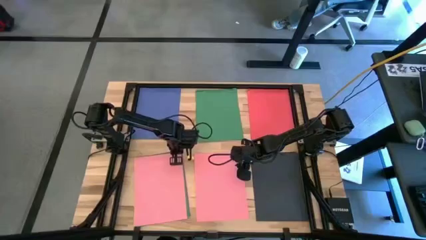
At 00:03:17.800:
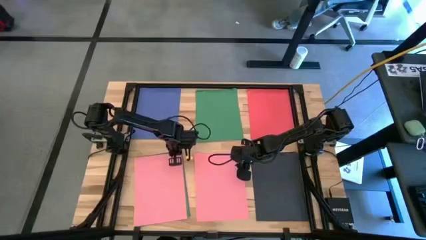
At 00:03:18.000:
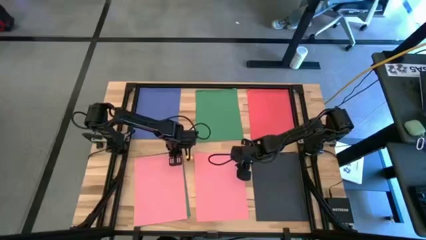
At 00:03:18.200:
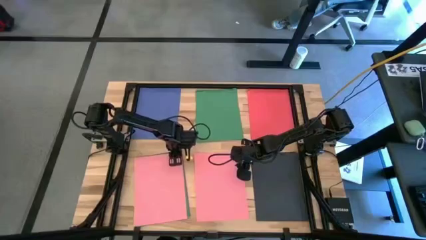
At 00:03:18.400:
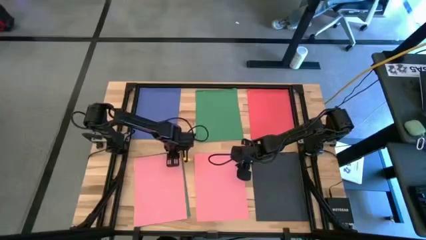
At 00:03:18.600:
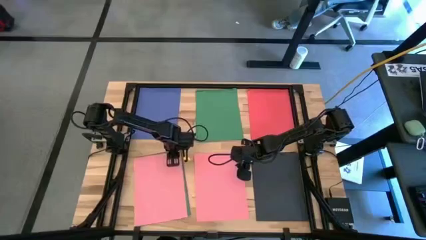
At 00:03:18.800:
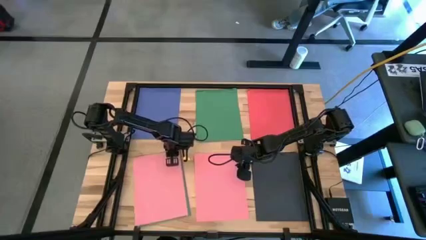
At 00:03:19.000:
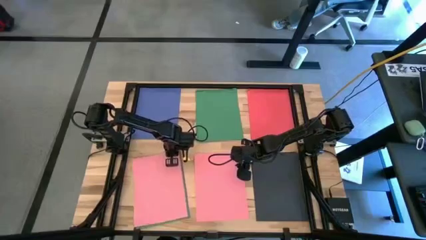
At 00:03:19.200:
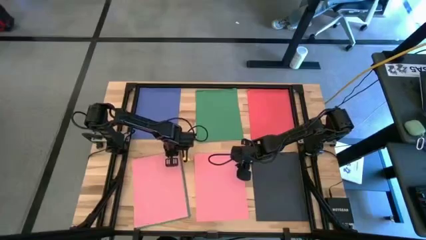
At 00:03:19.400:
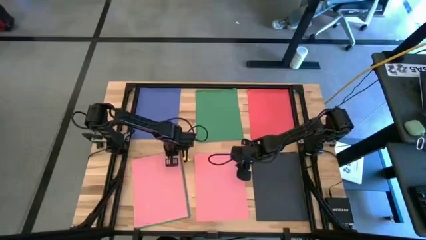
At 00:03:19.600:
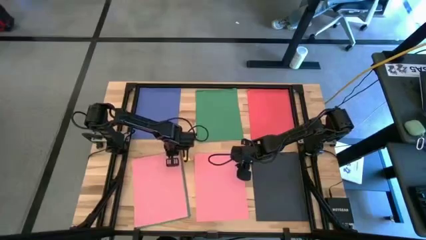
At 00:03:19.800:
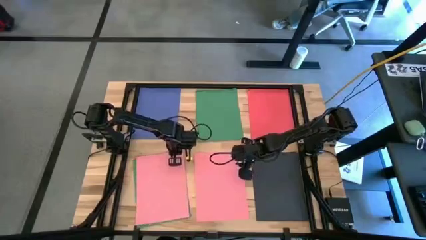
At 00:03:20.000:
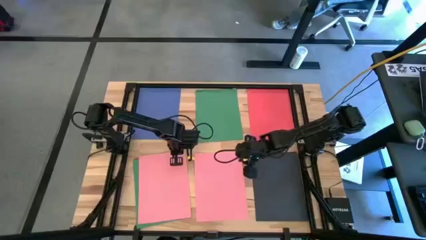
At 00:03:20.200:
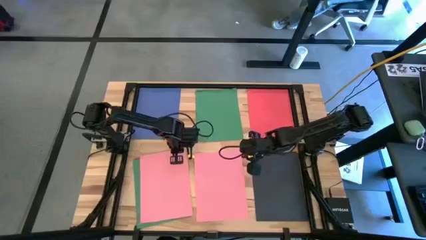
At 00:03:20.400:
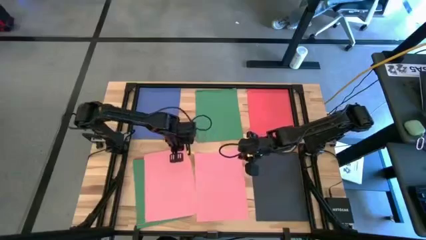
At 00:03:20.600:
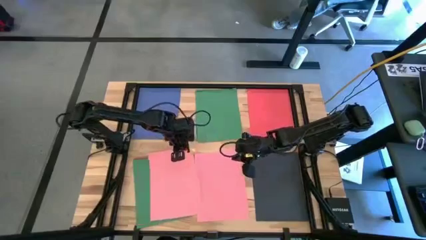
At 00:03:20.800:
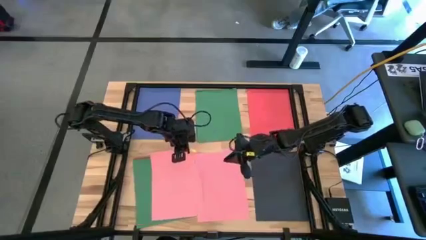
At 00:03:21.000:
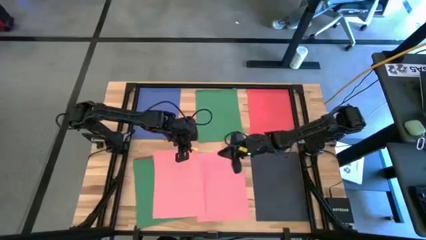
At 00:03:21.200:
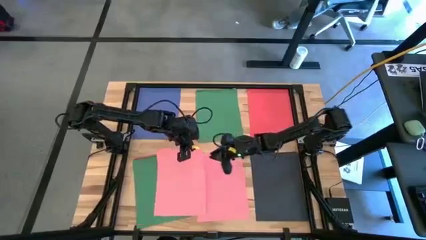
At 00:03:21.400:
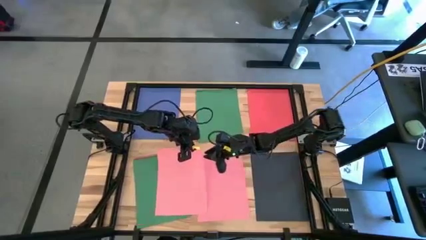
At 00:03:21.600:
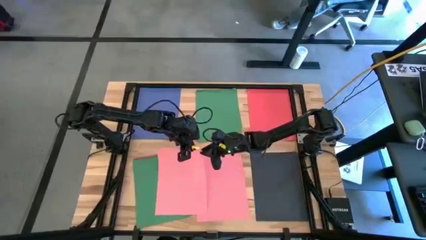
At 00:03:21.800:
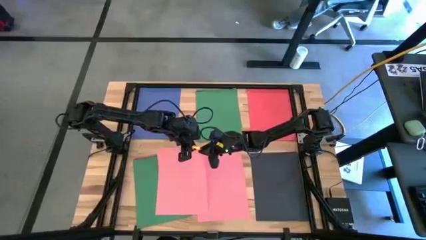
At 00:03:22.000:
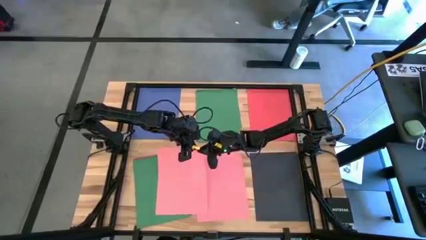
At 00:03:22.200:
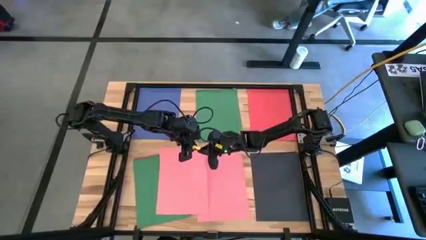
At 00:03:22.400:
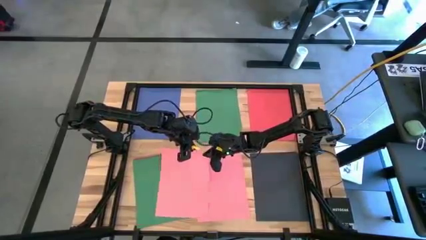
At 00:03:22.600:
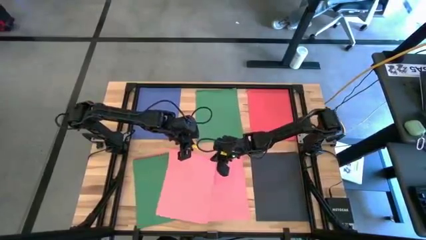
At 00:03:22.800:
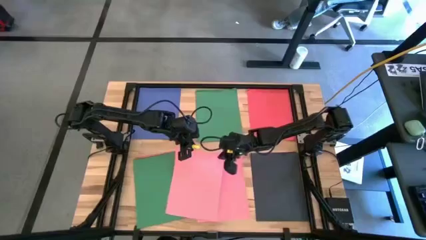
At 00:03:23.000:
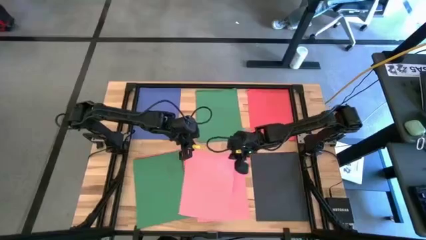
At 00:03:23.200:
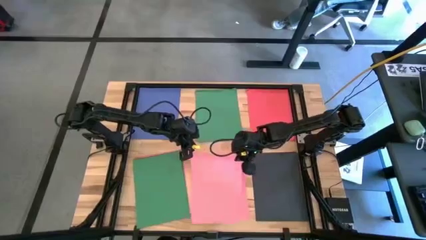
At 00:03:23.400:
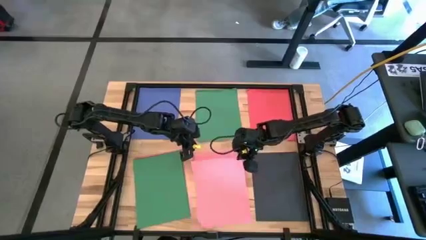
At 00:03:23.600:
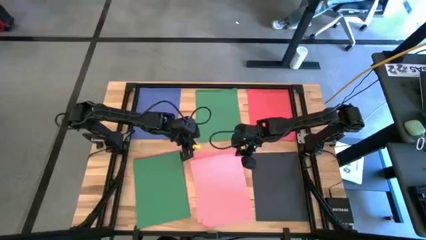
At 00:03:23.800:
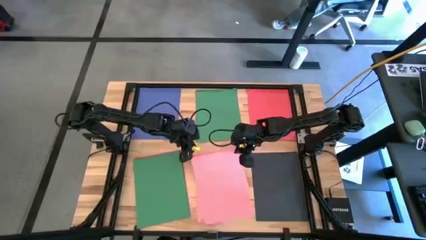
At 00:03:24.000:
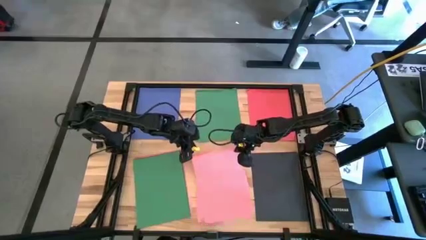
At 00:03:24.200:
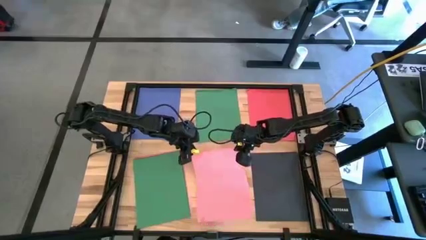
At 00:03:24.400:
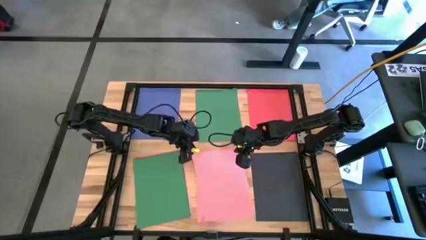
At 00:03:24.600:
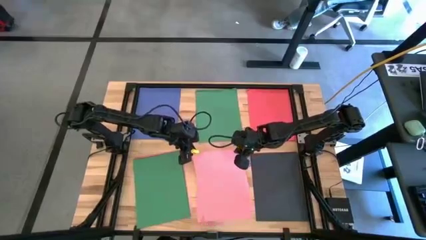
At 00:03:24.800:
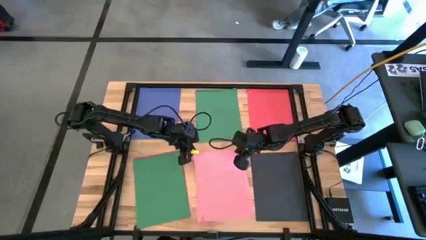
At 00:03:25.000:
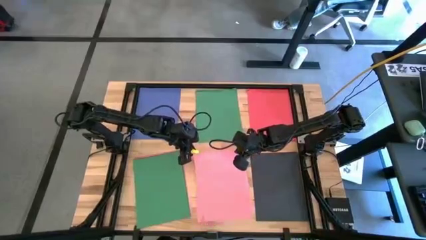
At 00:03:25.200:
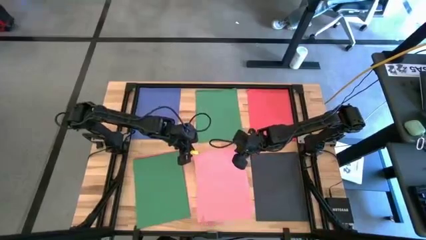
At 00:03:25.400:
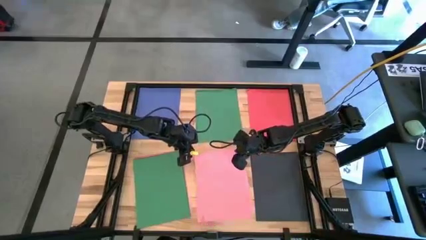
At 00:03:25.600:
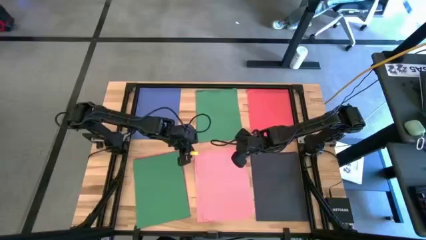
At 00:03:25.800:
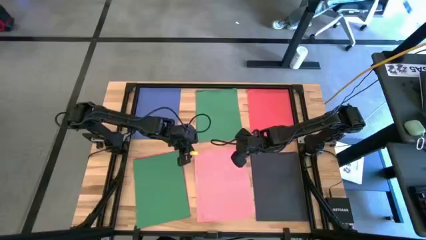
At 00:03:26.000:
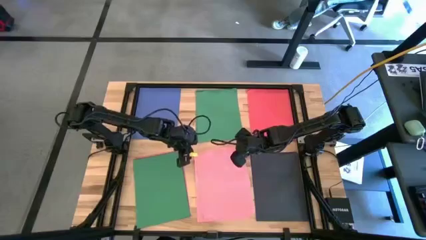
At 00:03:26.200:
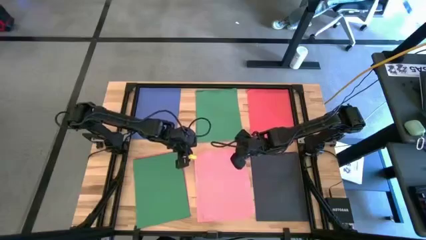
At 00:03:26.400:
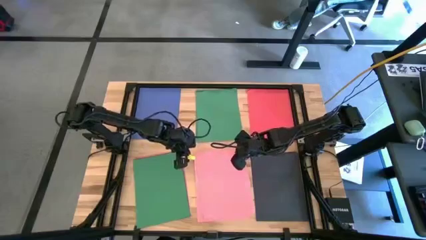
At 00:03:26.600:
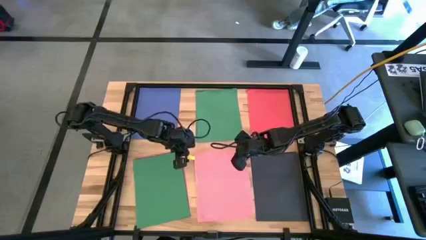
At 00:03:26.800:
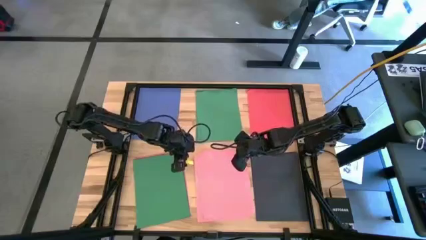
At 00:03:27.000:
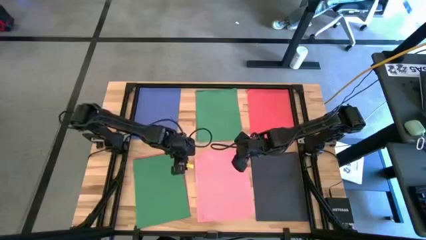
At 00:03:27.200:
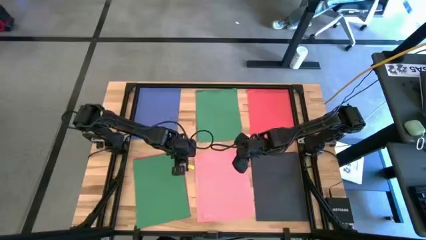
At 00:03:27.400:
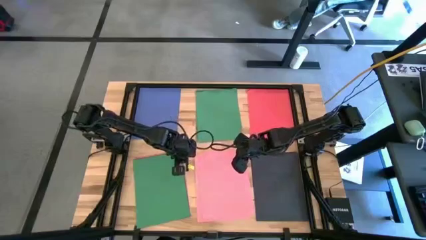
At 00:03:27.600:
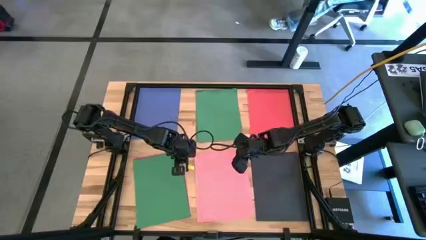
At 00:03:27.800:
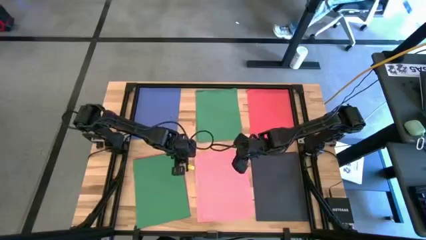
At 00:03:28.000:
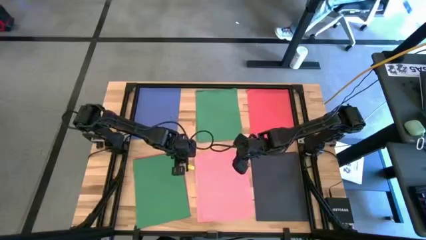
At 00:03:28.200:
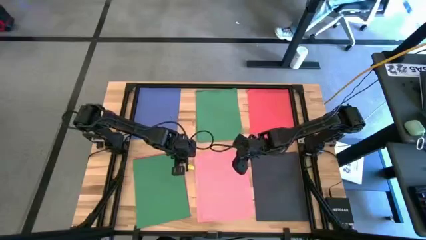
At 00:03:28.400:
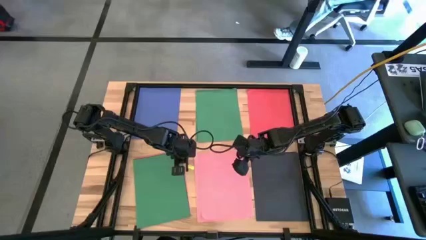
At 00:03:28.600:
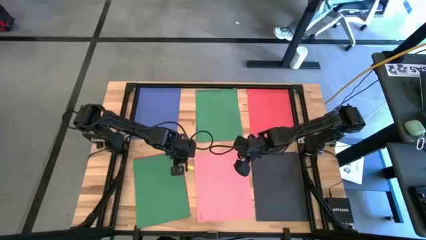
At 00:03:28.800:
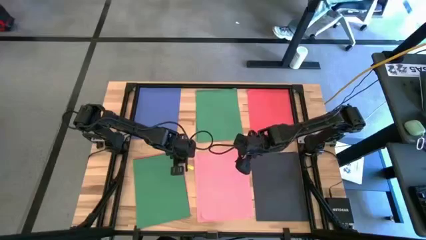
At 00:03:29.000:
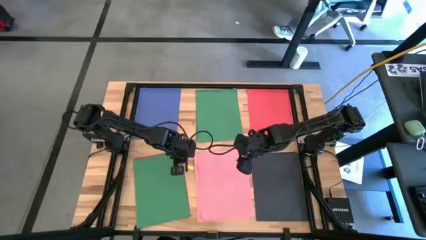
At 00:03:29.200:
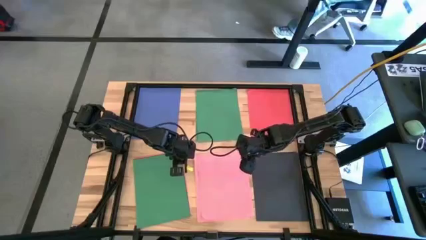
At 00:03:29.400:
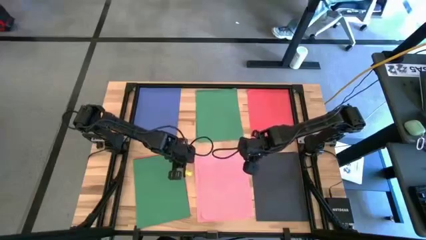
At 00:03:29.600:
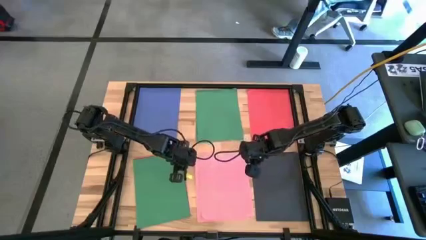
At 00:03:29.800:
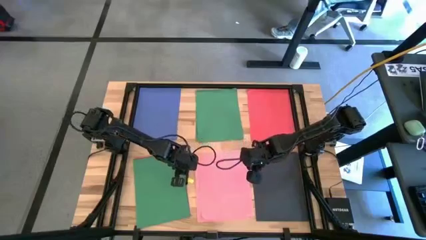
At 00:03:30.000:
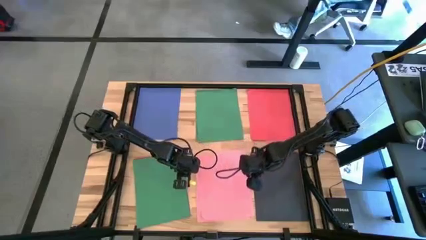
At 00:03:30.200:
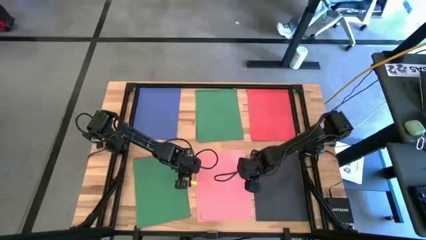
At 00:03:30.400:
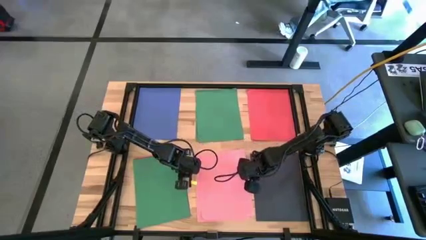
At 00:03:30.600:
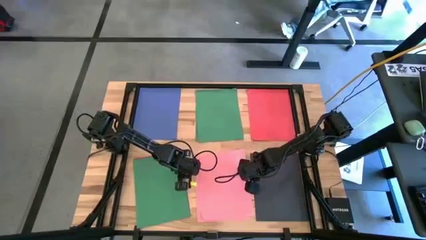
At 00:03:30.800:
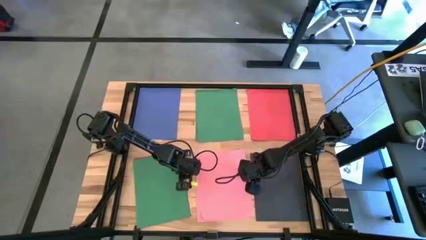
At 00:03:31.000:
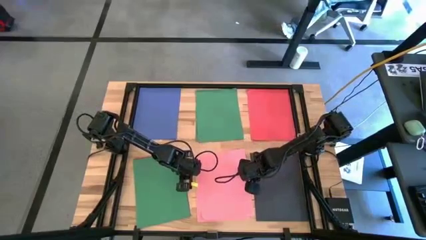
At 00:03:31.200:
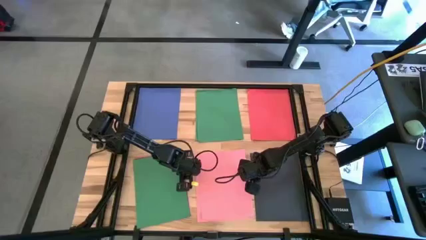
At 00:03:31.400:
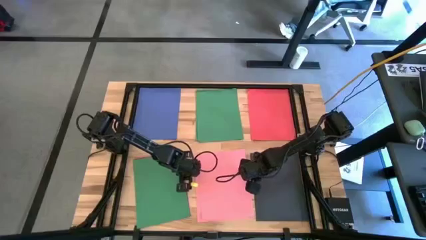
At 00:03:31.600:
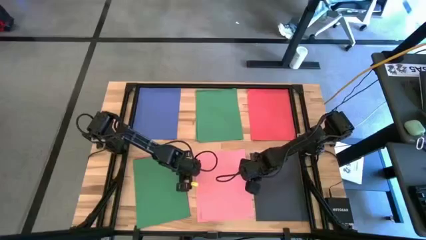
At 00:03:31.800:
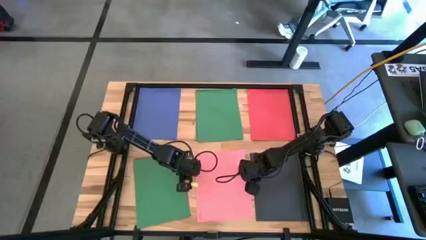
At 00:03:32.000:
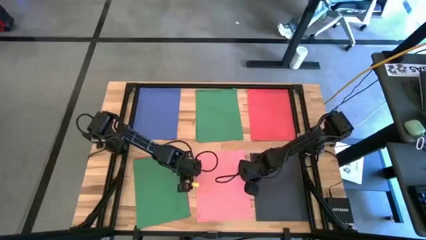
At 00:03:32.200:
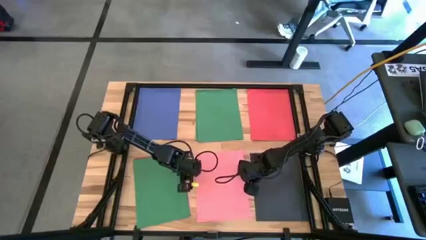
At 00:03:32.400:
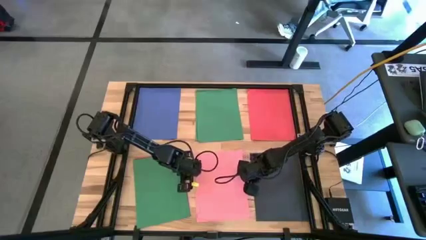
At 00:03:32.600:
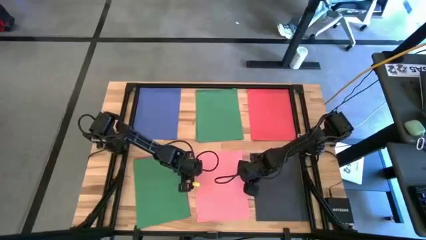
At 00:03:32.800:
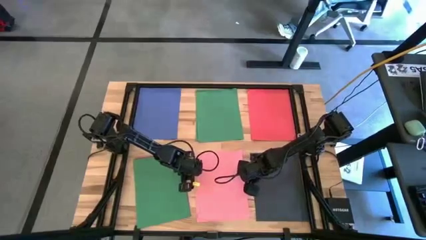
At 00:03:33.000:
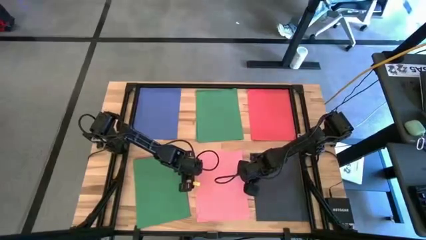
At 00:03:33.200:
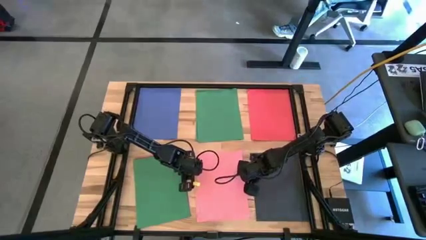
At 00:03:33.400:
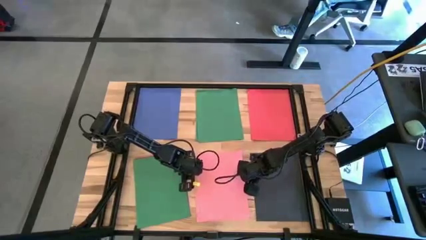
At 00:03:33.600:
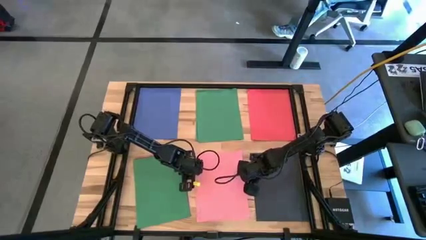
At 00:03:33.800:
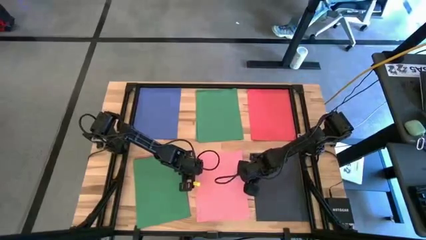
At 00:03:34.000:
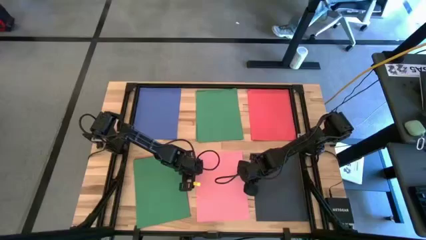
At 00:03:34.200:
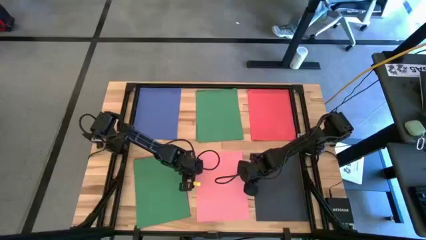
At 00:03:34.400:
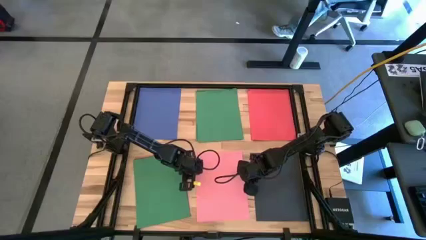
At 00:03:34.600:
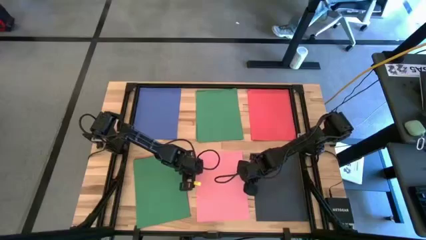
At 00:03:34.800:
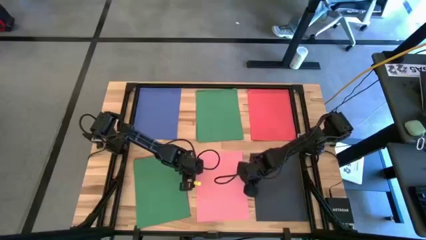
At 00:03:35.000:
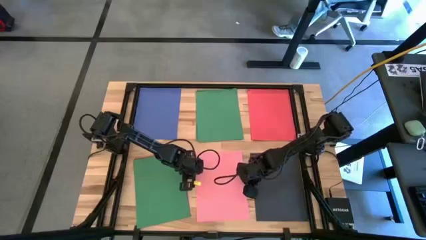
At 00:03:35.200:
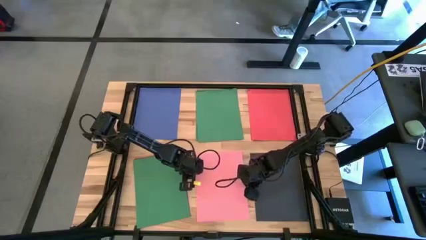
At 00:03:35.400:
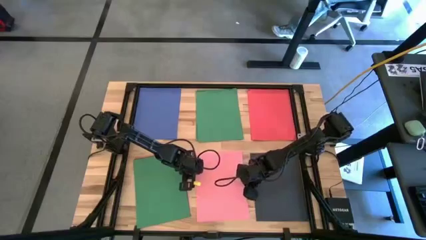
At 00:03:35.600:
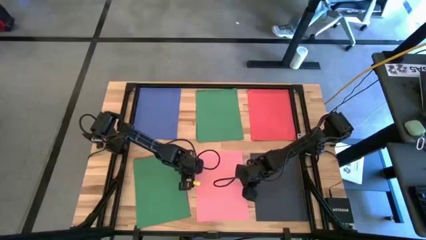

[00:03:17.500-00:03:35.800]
Task: Organize paper
Stack the pink paper on top of the other pink paper
